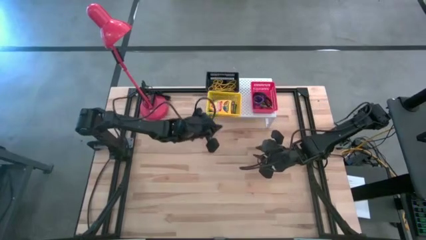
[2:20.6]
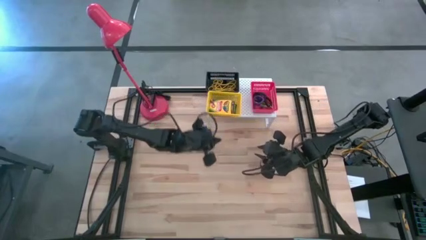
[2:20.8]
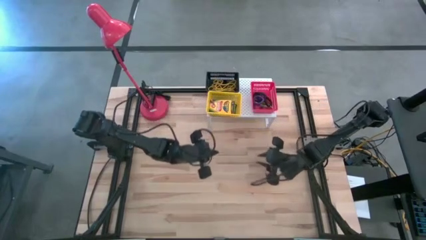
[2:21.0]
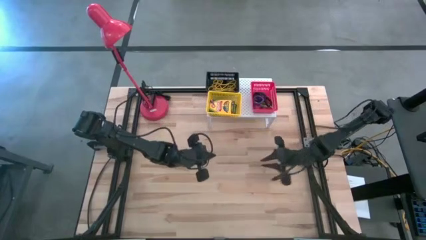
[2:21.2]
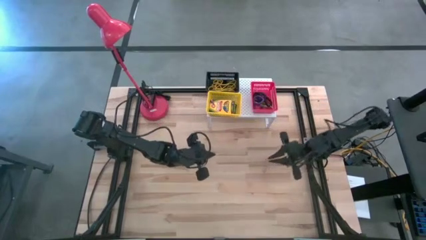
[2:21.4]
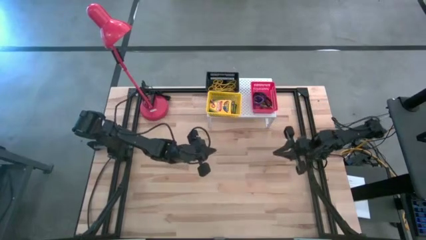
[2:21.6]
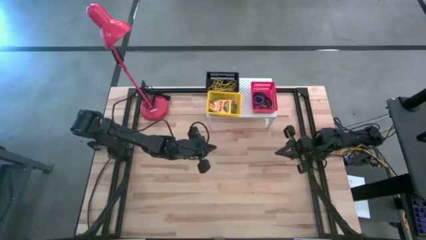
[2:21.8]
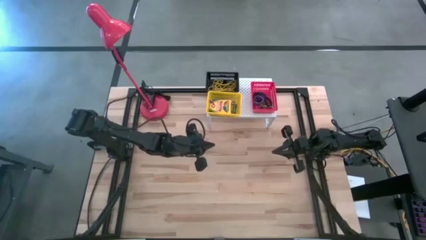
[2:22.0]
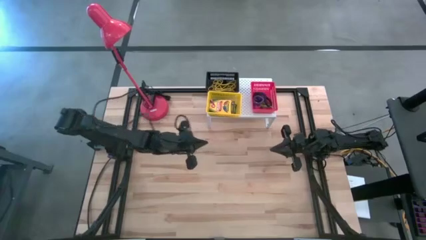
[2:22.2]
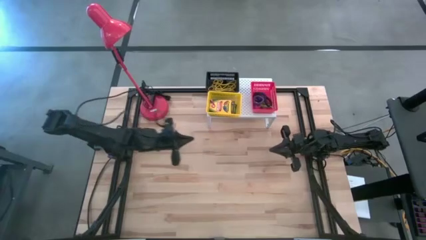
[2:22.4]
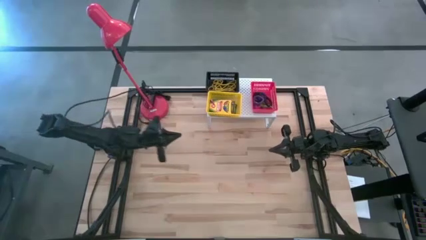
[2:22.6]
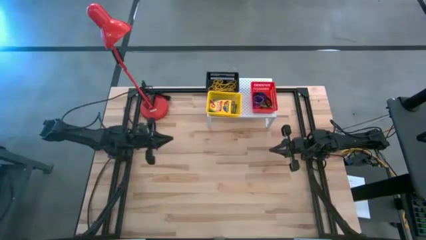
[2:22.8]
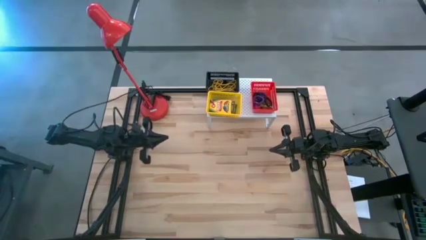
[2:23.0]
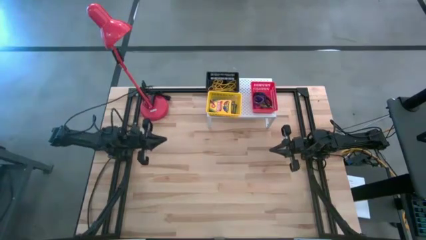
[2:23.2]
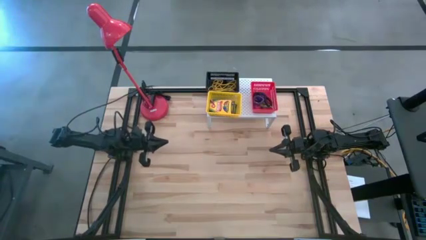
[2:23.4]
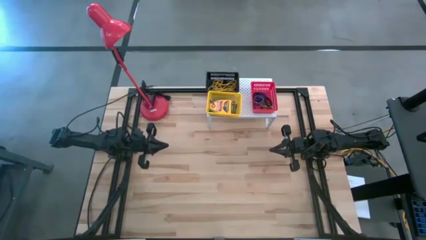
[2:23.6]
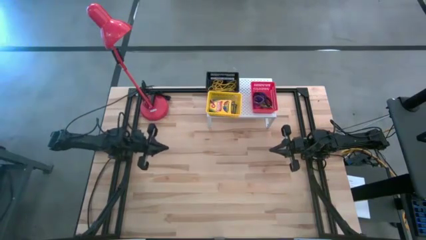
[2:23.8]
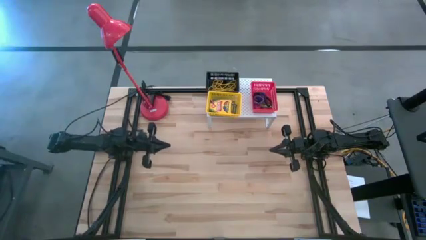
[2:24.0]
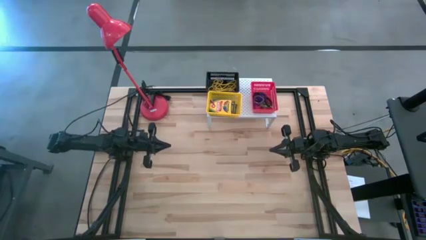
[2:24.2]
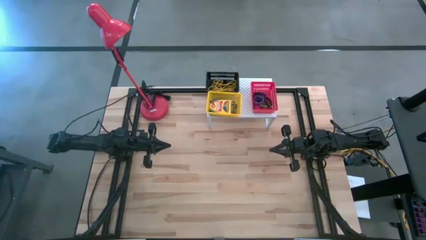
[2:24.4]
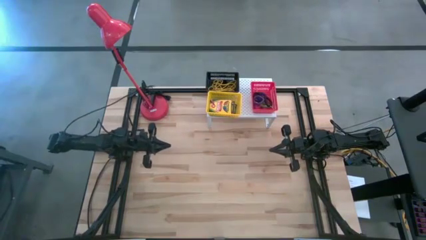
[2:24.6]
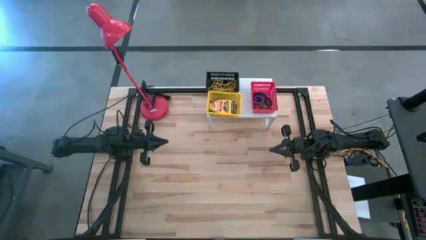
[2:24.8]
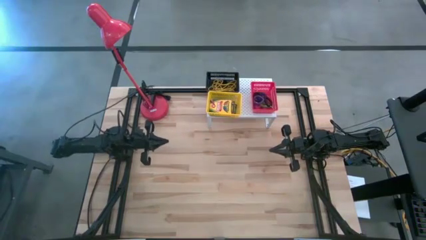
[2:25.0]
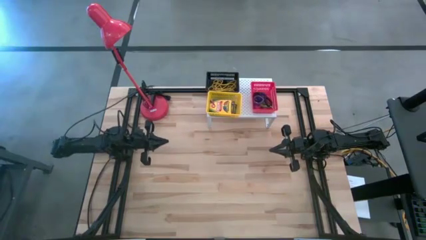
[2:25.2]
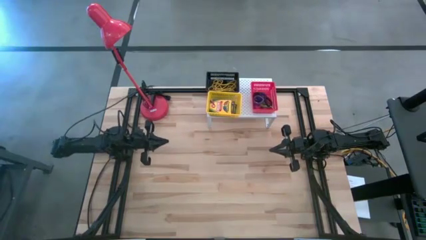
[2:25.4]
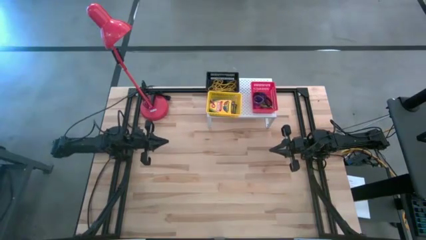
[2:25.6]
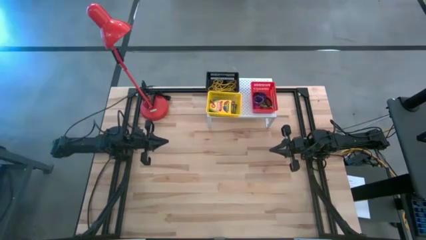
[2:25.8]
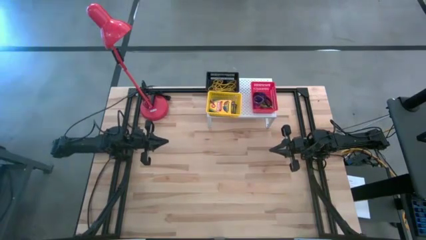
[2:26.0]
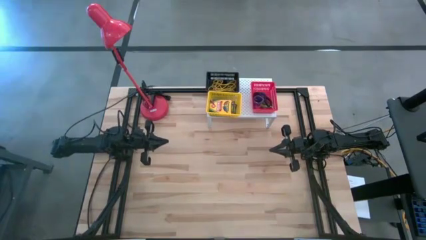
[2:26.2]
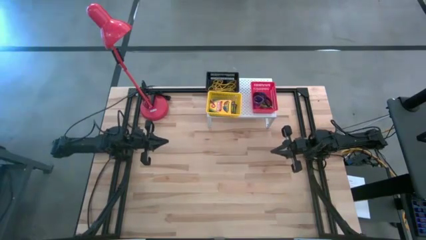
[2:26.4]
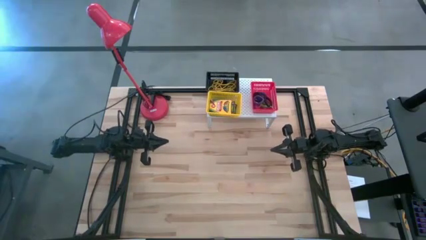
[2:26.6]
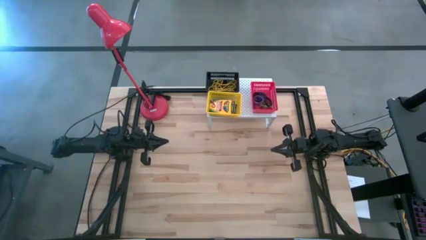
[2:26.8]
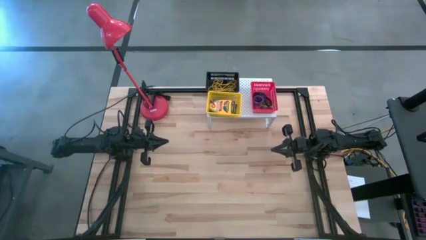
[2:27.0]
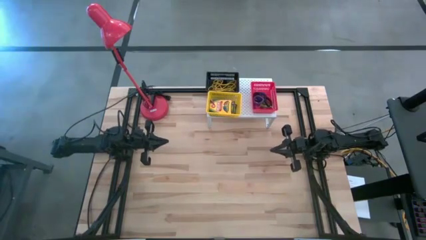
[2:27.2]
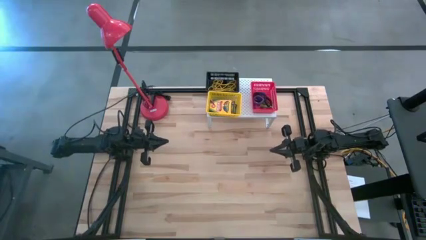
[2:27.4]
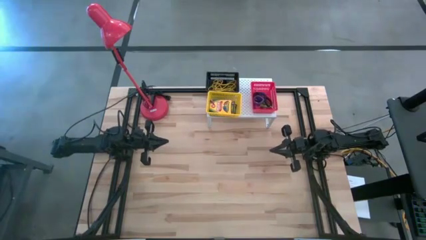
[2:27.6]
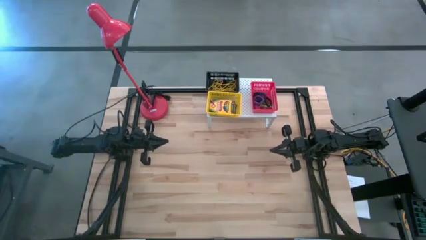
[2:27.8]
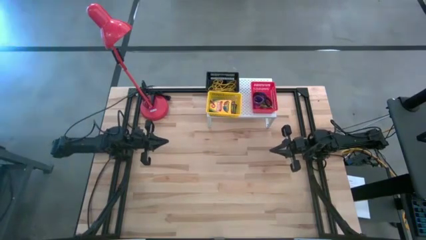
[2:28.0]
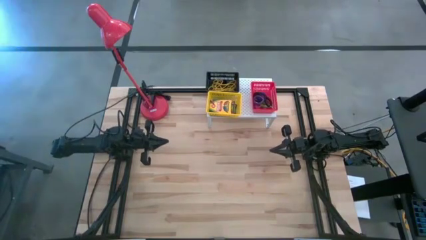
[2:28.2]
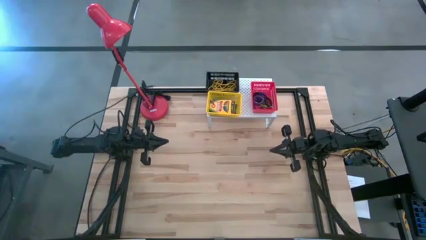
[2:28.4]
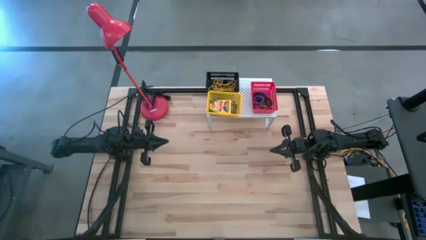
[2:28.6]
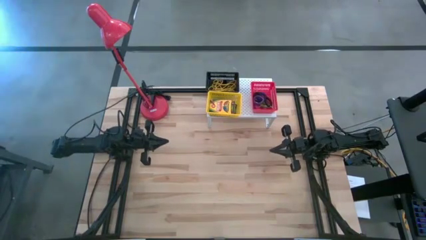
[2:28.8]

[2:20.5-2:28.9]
Task: Pick & Place Office Desk Supplies
Return to Home Position

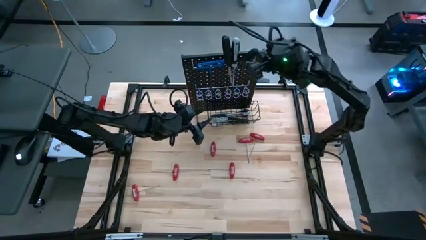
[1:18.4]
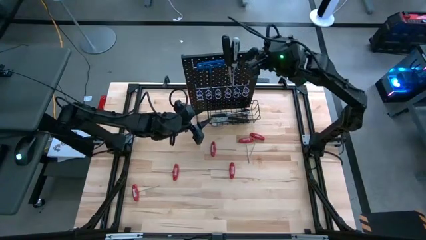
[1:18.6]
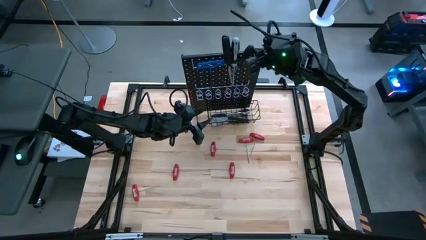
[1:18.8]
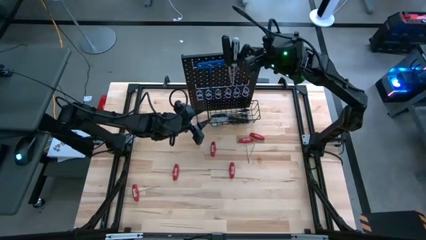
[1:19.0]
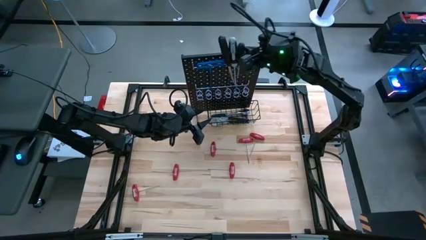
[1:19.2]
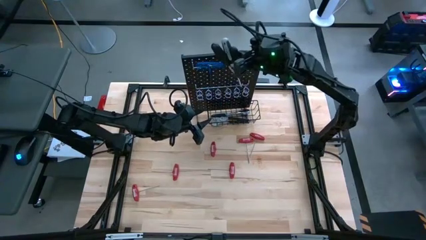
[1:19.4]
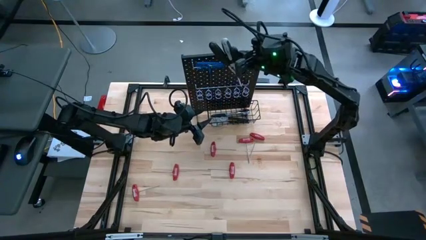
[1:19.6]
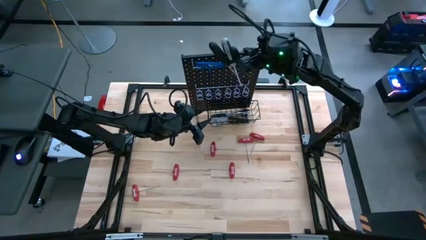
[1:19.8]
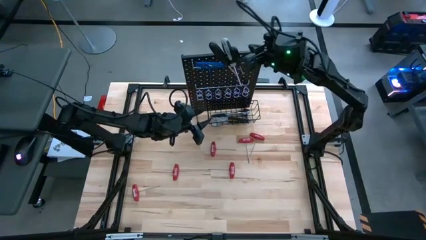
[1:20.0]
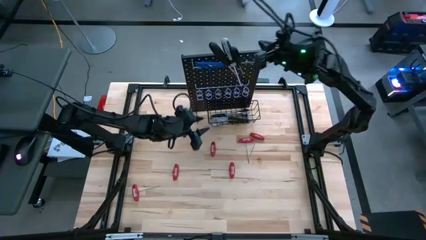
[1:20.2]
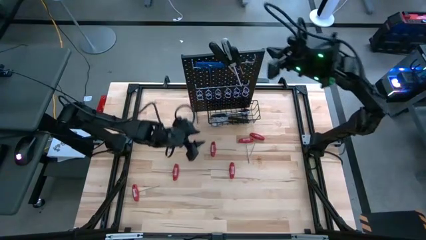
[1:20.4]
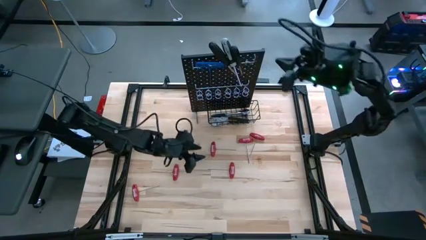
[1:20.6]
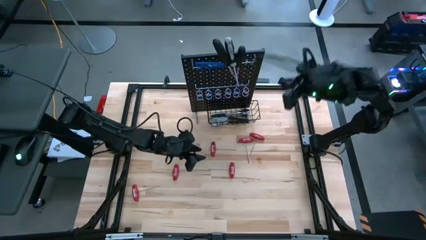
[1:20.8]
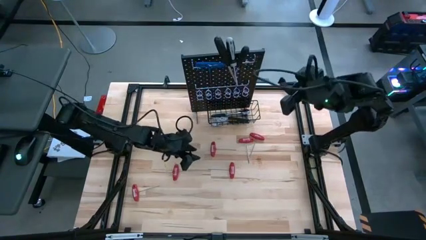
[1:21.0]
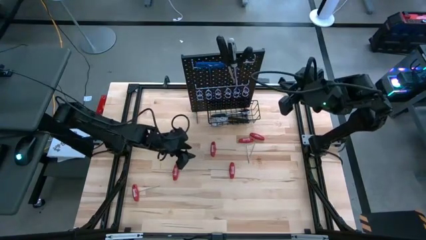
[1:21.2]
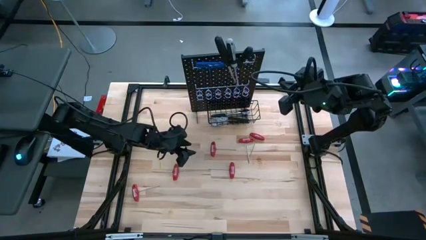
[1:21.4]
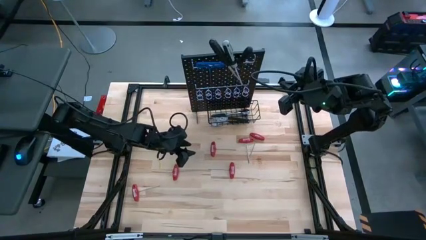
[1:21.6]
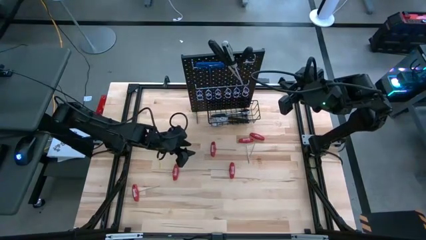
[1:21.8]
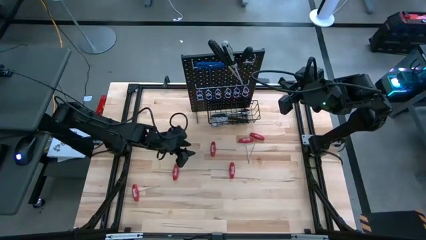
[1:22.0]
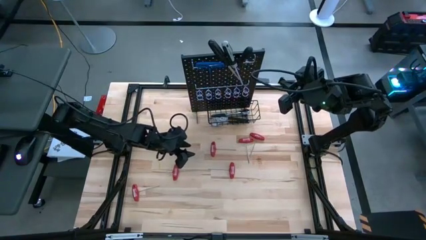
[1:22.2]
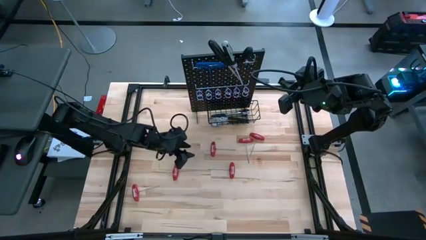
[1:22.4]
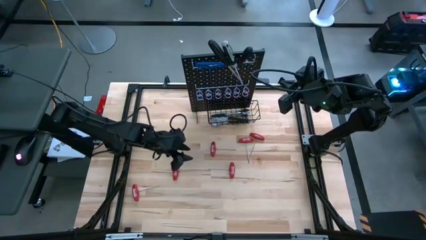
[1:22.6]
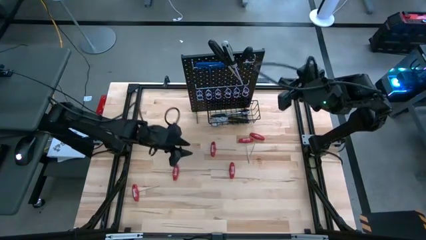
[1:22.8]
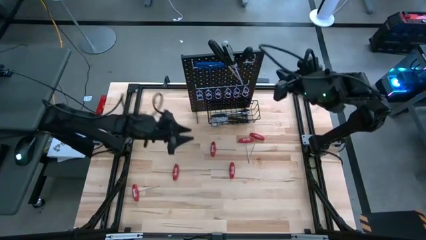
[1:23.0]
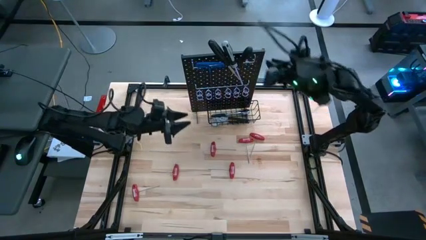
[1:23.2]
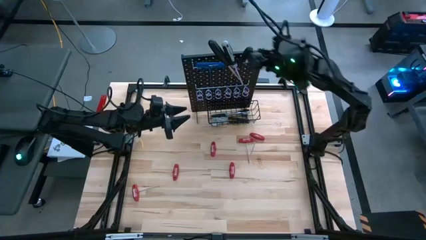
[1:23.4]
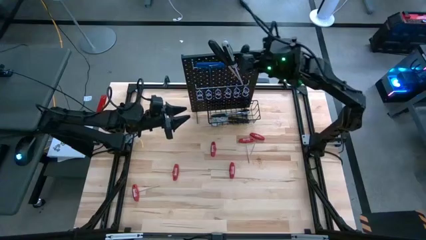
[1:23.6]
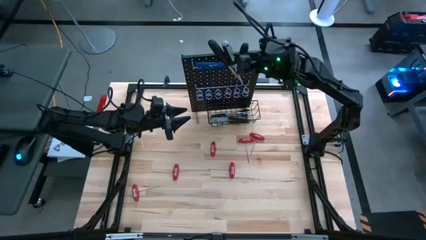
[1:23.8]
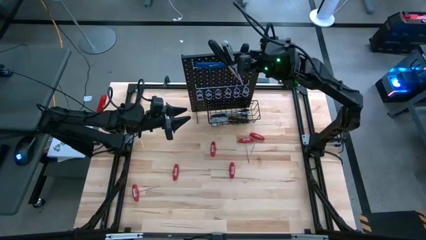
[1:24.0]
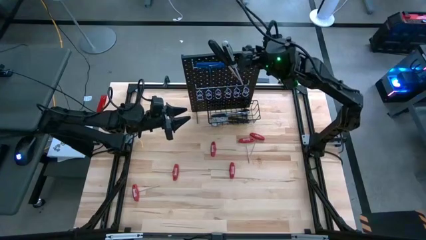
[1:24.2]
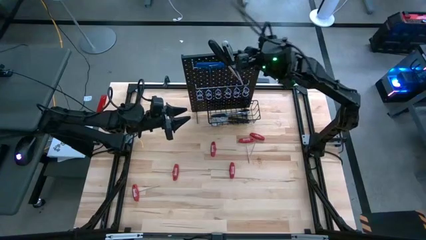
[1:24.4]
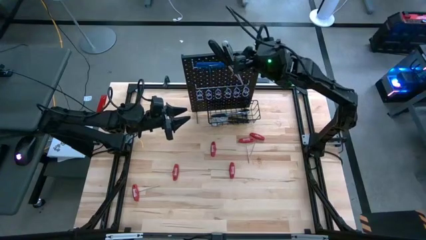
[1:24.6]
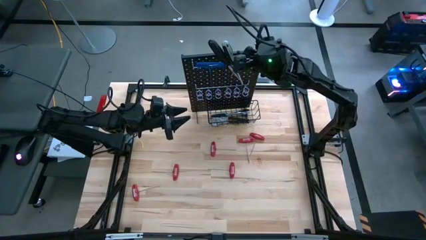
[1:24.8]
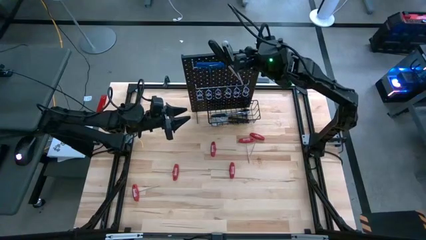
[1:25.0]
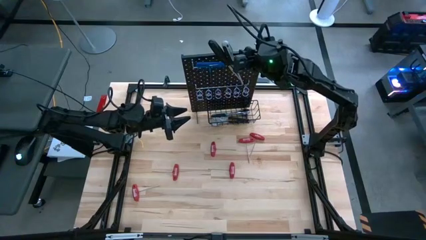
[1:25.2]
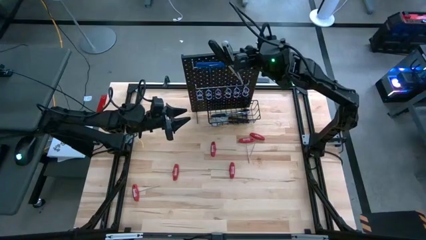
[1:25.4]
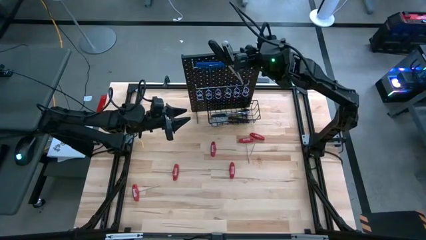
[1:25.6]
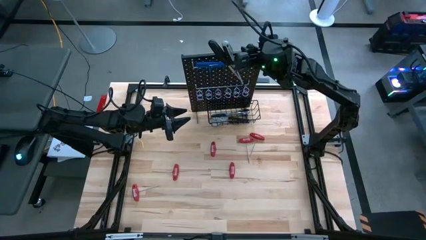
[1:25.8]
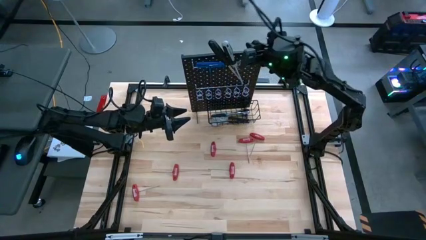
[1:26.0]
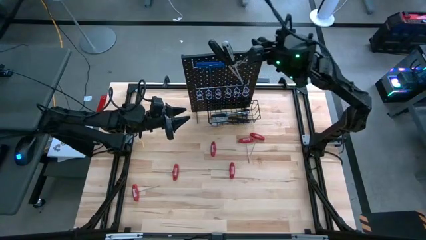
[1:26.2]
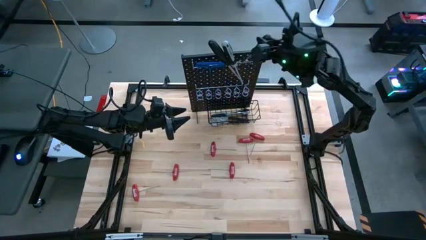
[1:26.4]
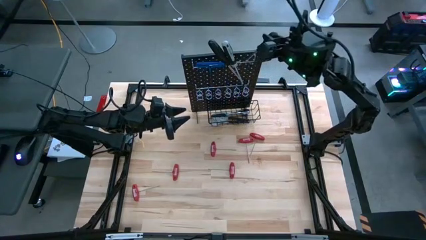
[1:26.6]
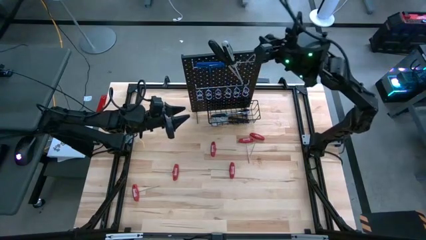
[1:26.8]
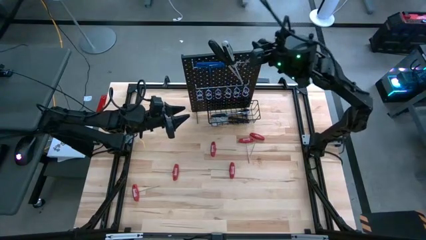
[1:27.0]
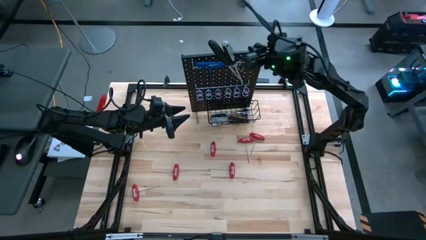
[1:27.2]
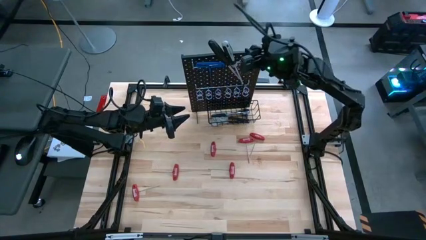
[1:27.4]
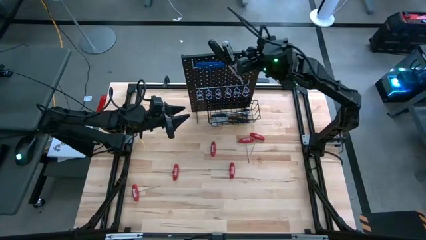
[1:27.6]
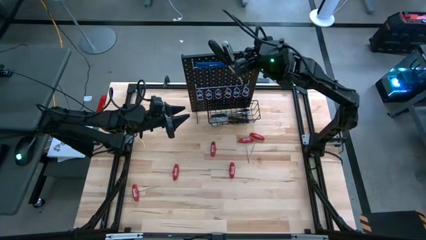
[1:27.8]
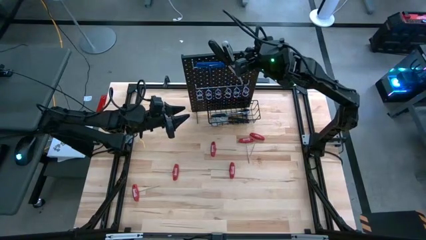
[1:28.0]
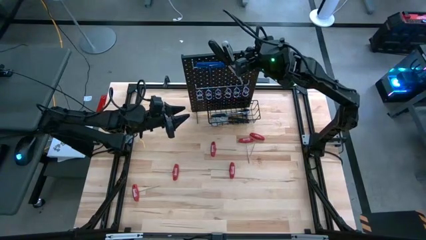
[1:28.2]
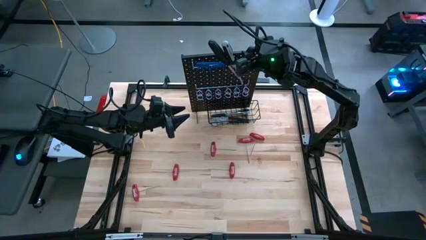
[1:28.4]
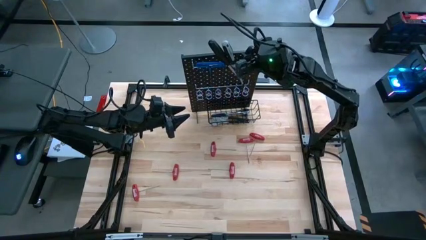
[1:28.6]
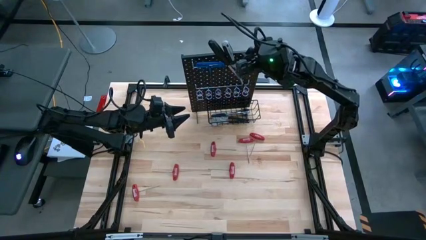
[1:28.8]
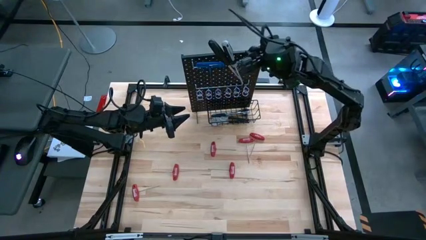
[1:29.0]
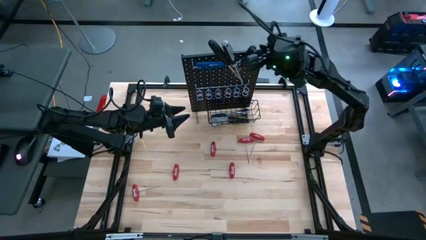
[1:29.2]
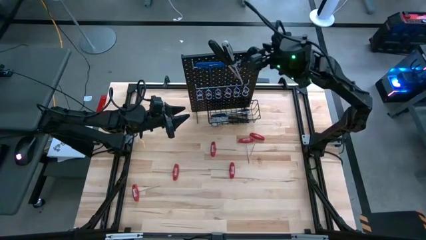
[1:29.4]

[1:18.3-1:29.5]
Task: Hang tools onto peg board
Hang the black screwdriver on the pegboard
